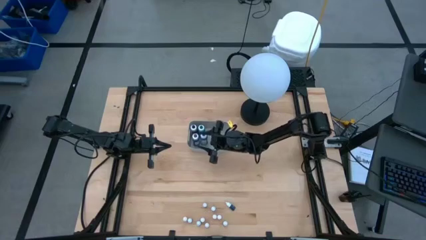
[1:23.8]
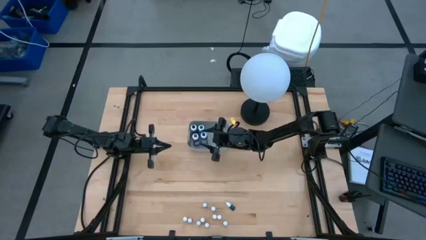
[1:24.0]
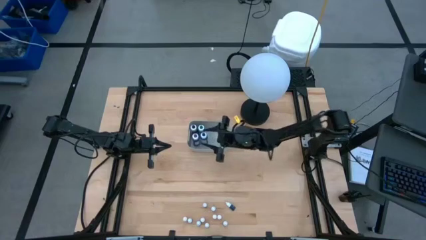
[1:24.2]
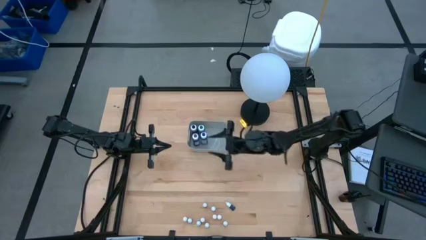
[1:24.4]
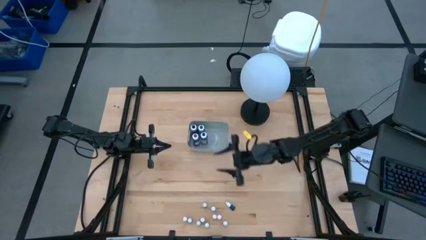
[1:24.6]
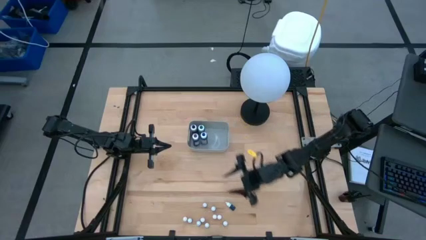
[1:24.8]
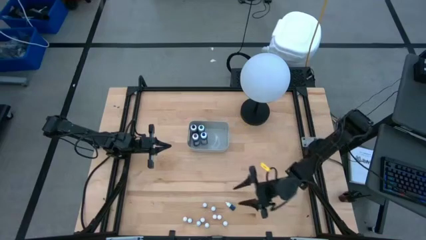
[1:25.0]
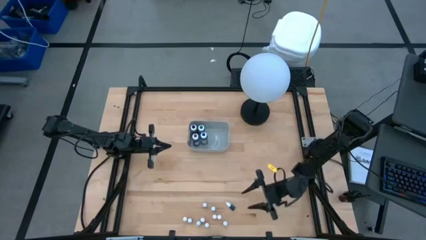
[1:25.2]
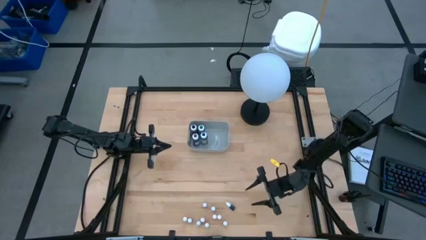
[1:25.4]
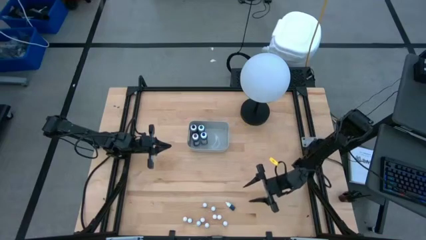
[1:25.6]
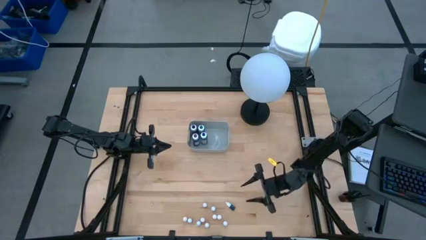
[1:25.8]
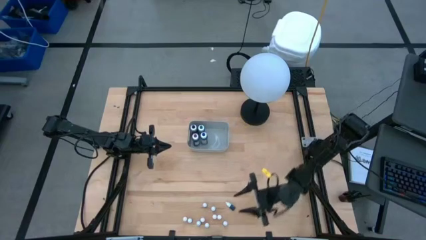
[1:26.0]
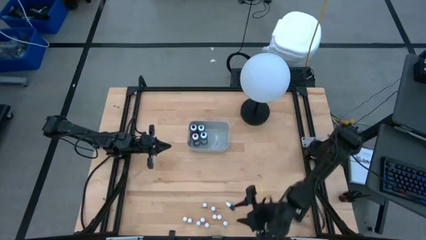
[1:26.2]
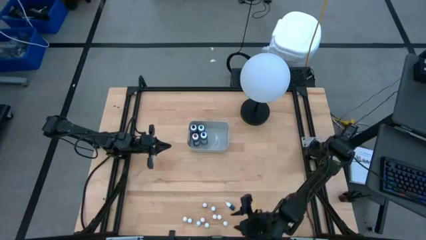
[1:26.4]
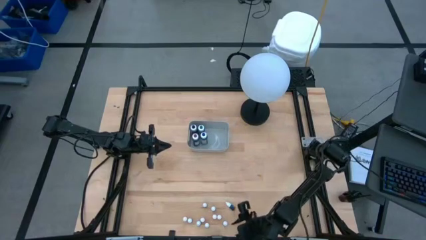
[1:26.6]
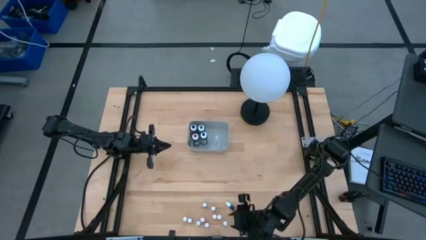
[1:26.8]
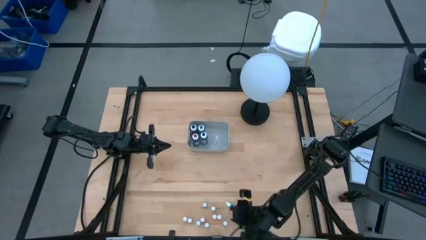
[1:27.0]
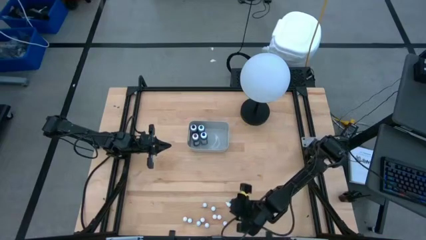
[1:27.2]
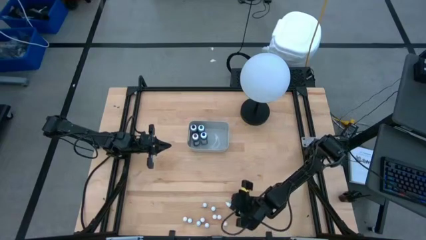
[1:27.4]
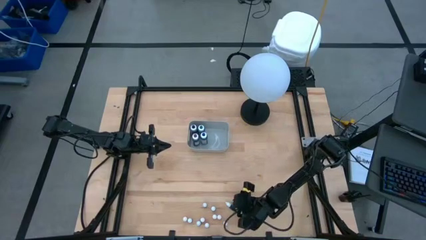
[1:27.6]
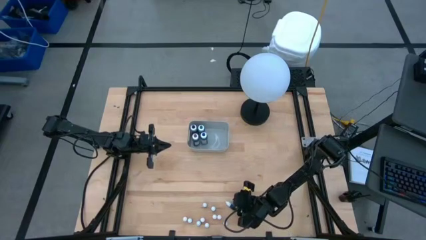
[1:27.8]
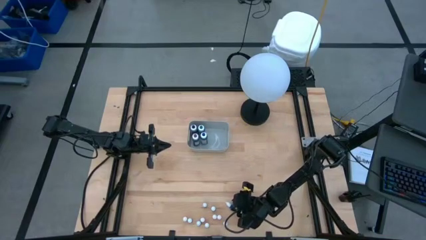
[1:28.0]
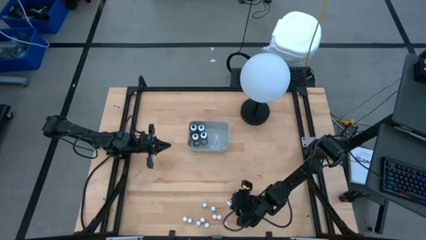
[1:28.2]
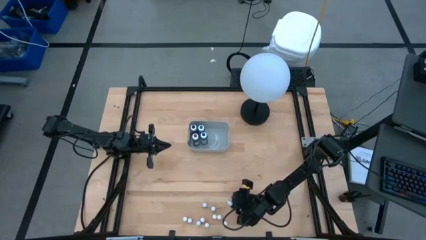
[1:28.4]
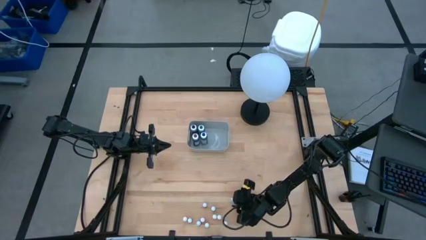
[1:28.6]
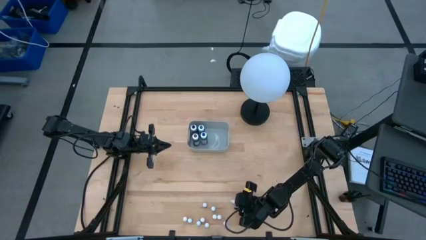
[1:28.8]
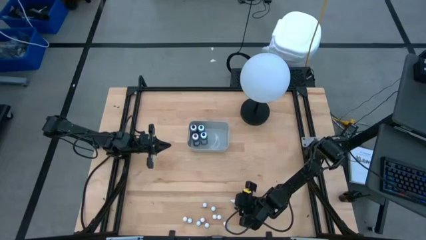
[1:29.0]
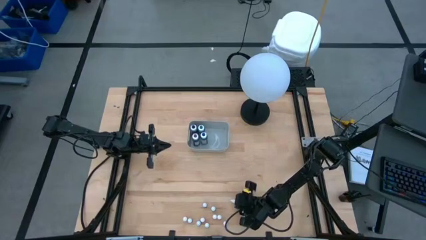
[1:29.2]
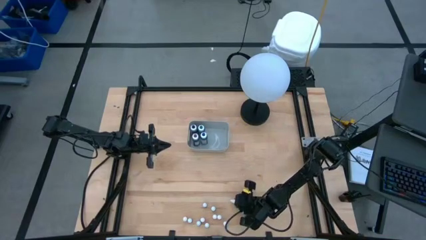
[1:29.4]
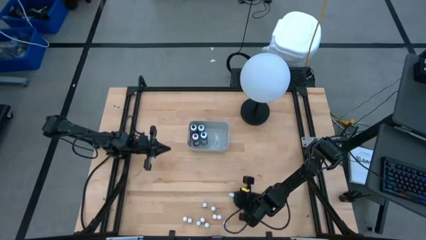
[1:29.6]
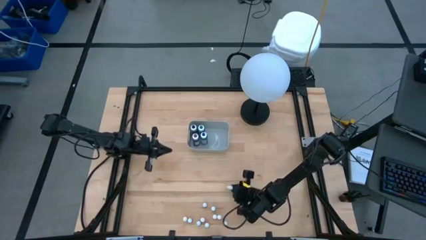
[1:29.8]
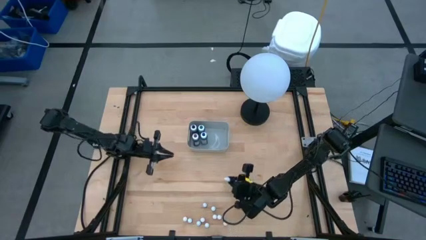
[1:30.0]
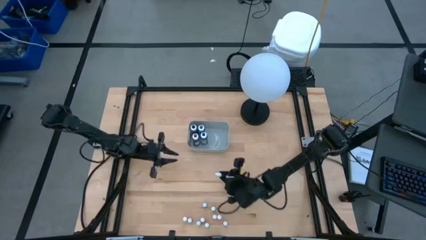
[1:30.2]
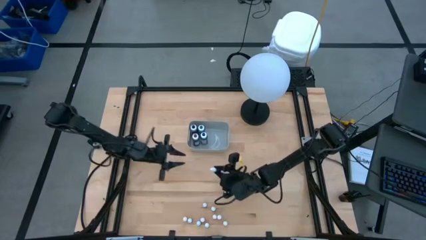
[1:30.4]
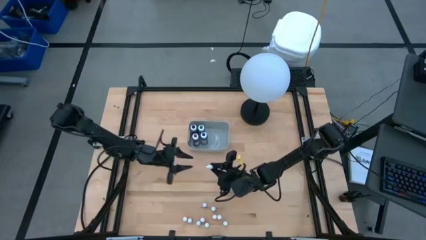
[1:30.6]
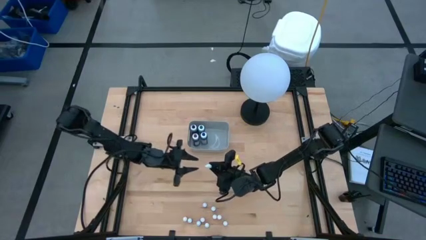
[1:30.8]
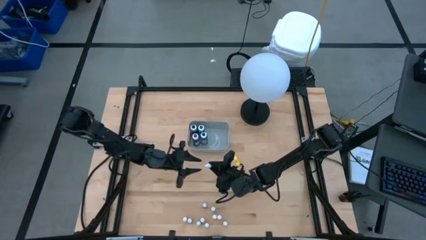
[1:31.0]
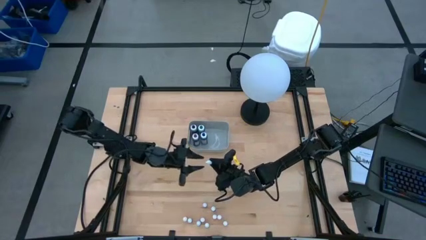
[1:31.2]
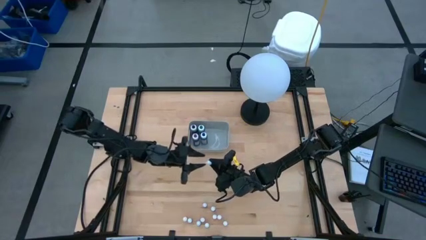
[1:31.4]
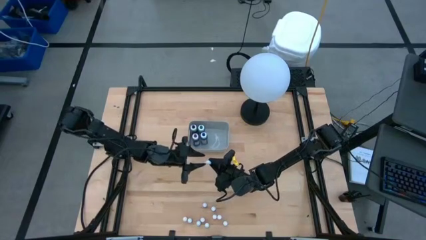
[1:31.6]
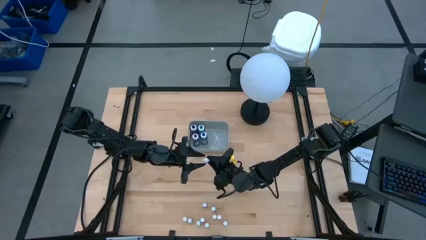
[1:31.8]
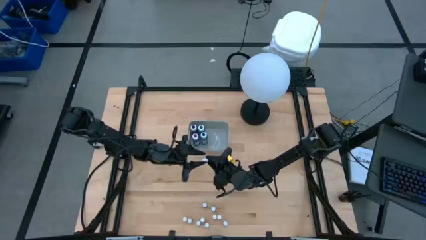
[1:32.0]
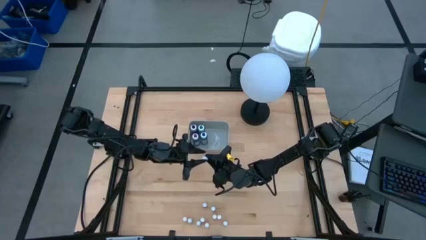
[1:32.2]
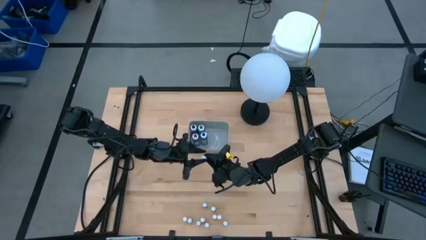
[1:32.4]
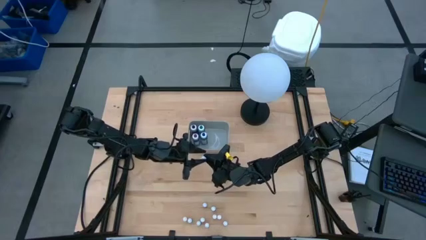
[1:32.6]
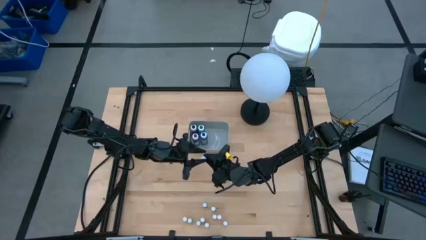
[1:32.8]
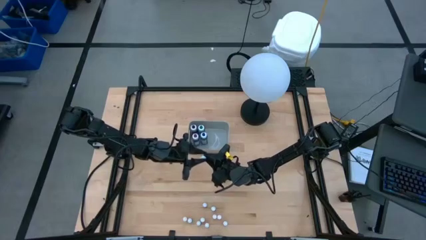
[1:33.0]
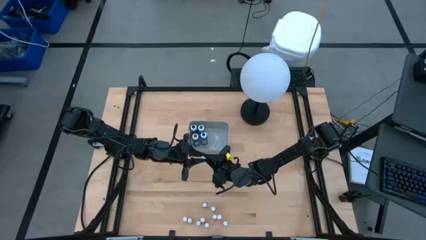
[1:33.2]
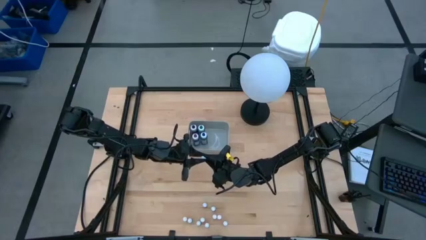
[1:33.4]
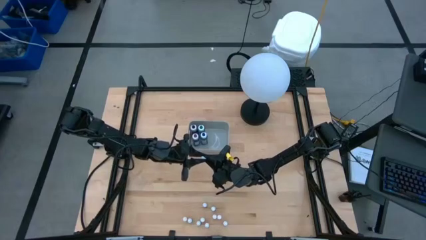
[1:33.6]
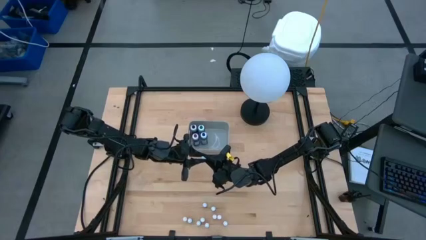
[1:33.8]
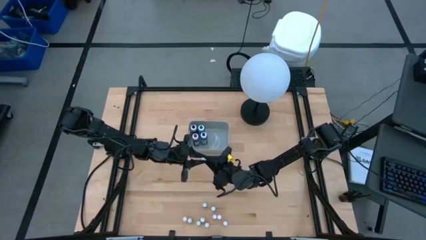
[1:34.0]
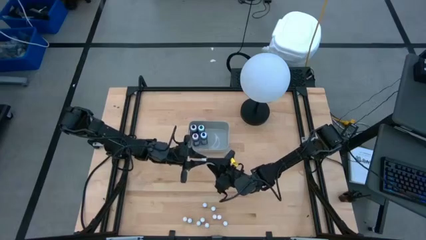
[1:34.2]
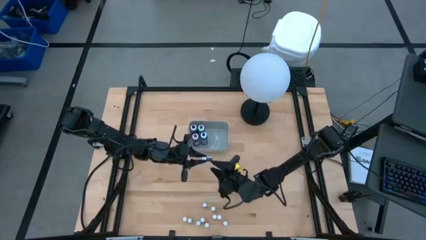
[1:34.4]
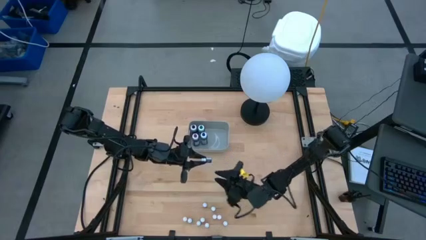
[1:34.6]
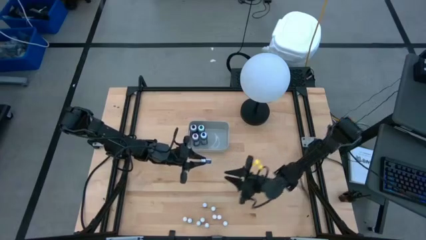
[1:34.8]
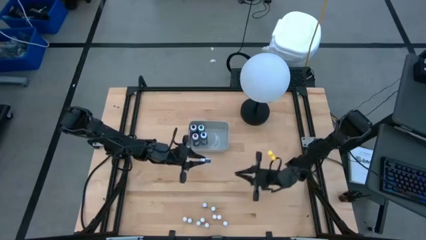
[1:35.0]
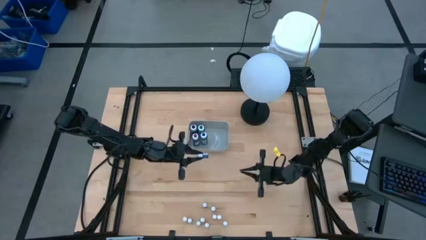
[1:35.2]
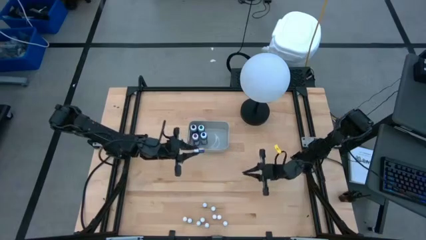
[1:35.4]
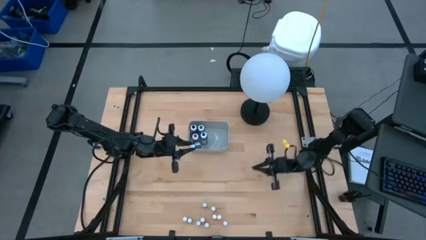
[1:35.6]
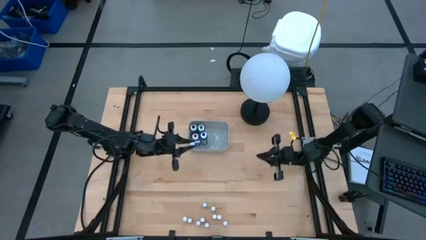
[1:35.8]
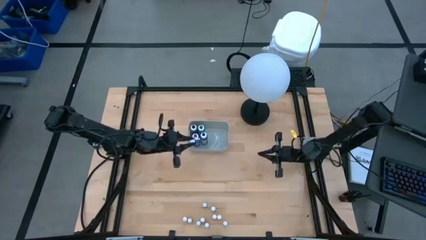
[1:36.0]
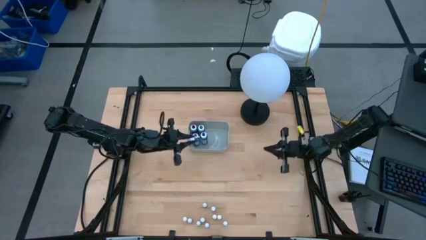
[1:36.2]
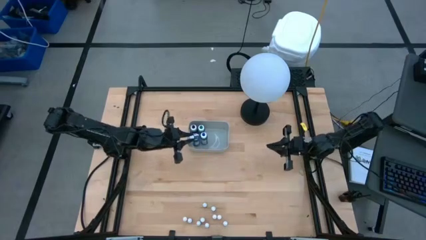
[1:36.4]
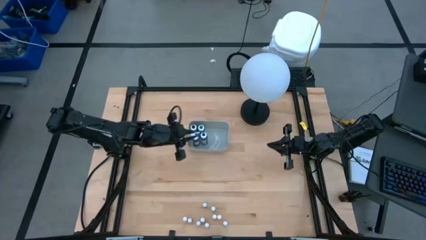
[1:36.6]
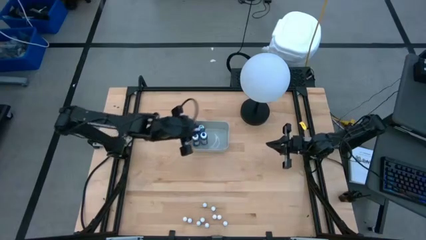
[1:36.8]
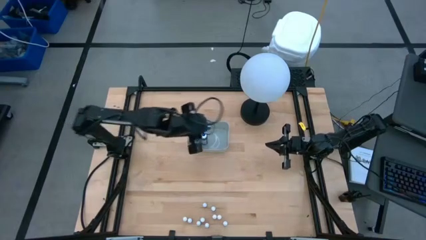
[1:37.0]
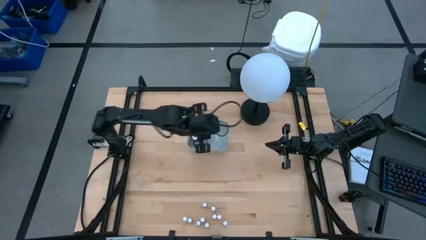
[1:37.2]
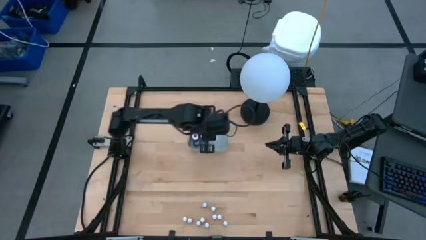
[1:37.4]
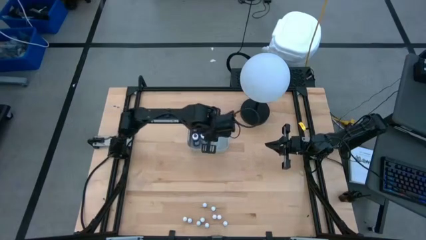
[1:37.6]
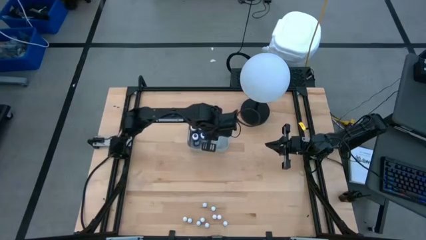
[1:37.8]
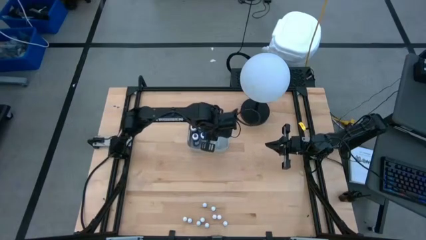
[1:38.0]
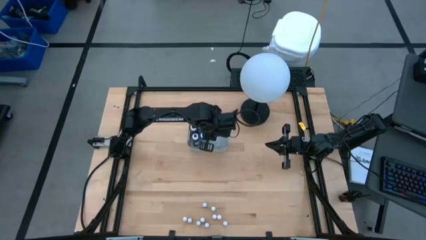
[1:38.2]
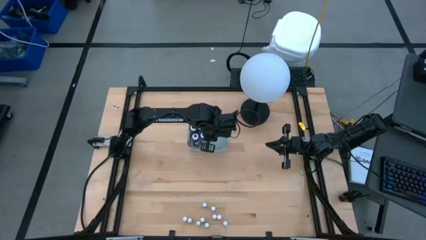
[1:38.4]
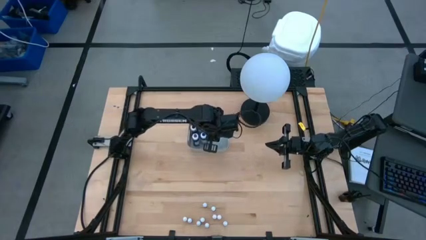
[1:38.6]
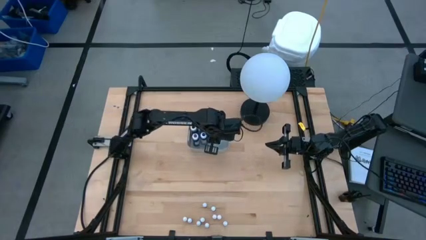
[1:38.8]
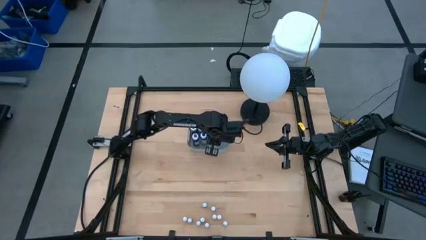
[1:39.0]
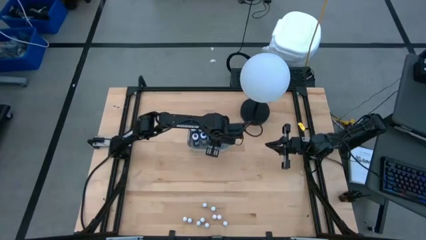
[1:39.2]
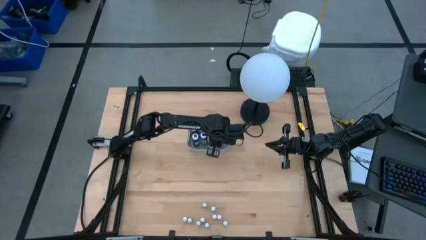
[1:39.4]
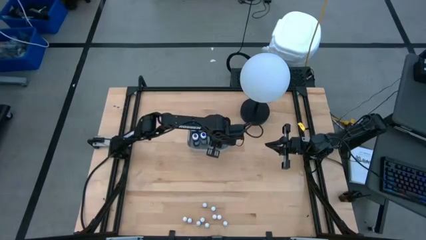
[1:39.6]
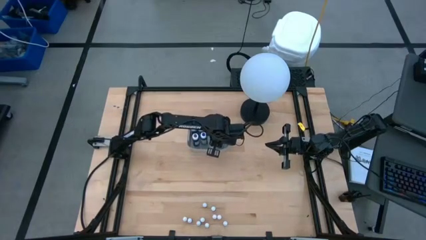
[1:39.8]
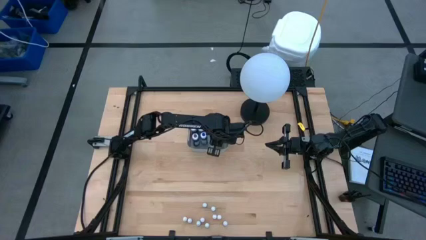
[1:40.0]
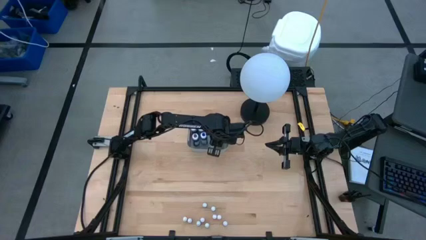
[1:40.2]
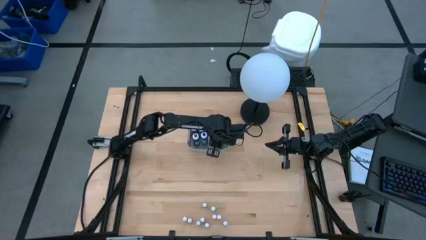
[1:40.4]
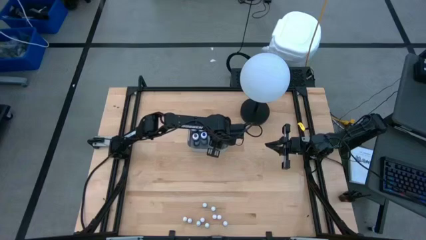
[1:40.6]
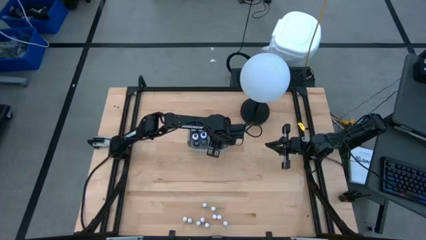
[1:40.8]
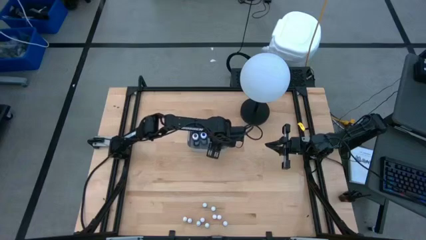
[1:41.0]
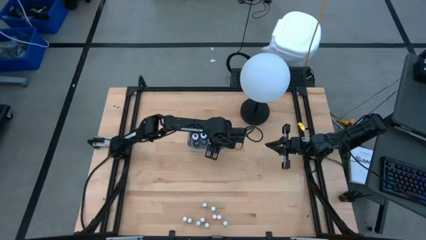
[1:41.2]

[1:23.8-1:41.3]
Task: Pick & Place food coloring
Put the small blue food coloring bottle into the gray bin
